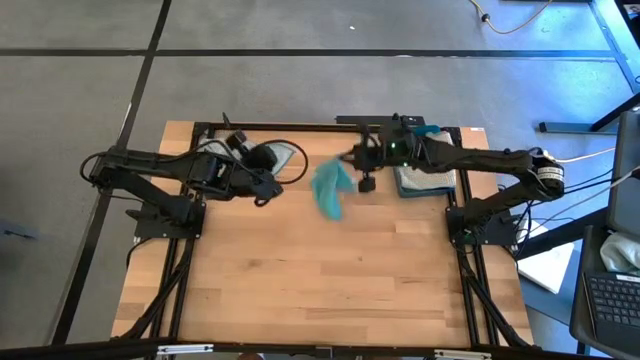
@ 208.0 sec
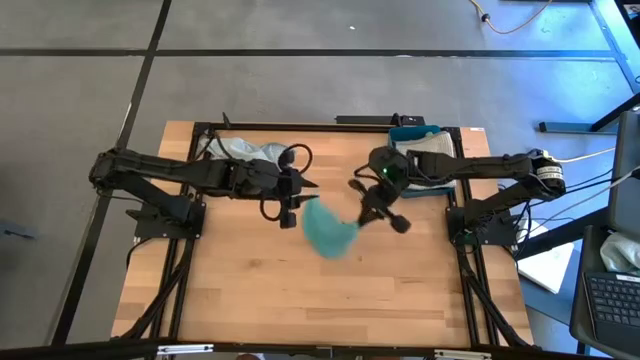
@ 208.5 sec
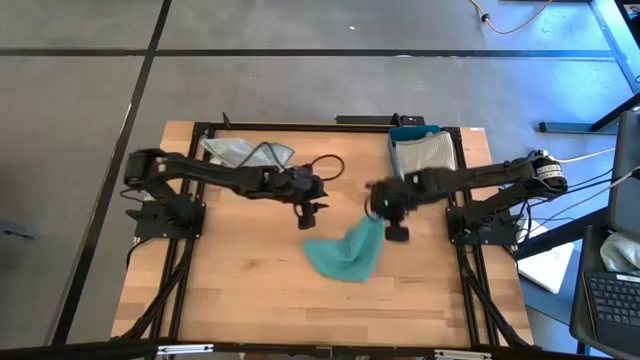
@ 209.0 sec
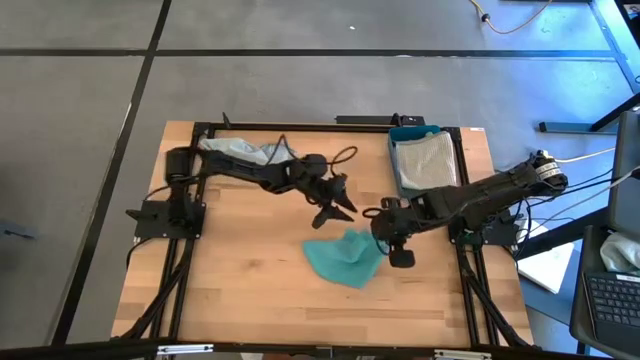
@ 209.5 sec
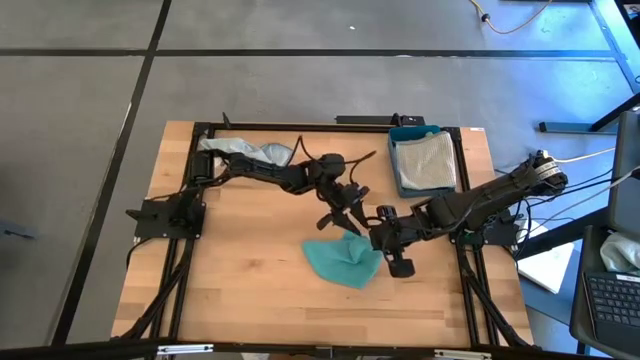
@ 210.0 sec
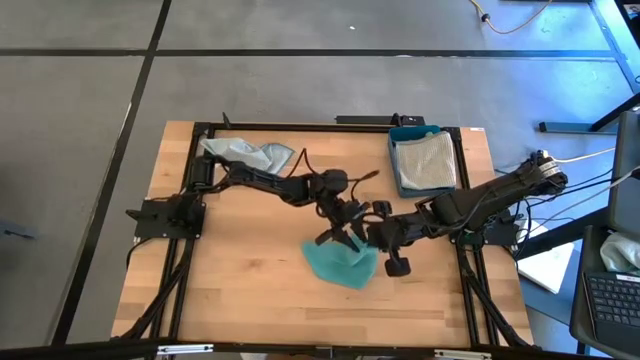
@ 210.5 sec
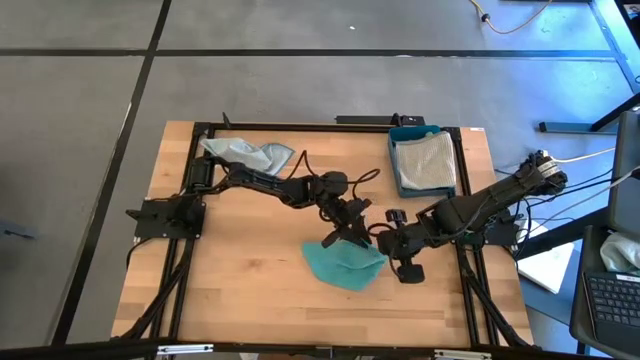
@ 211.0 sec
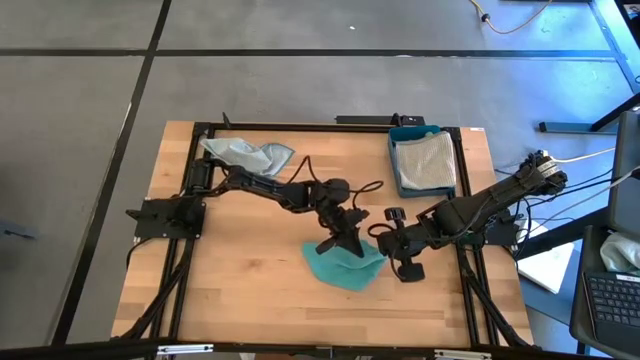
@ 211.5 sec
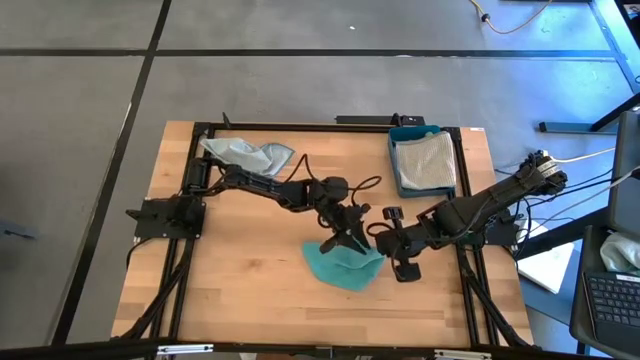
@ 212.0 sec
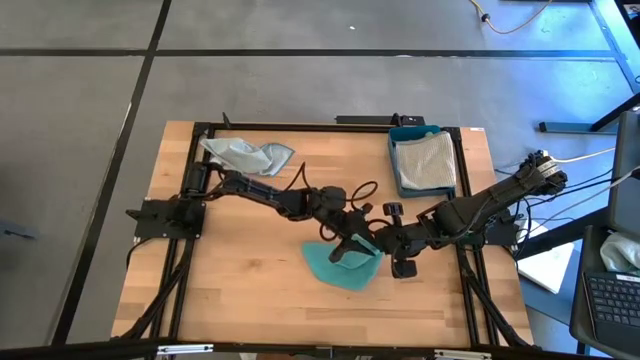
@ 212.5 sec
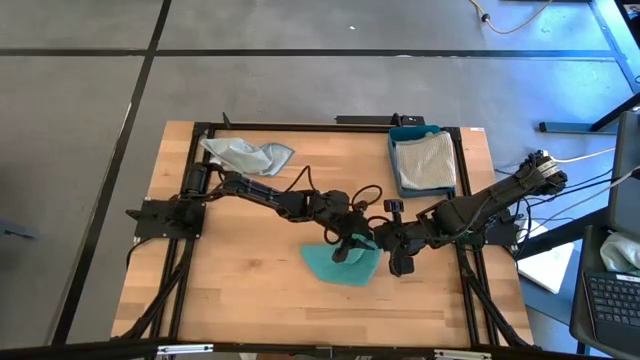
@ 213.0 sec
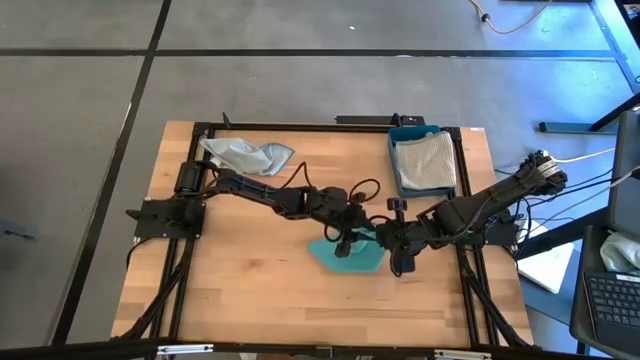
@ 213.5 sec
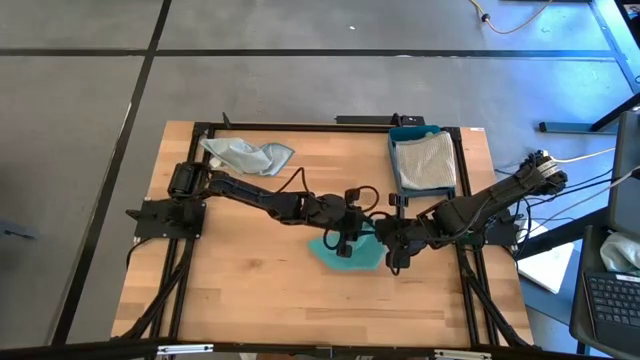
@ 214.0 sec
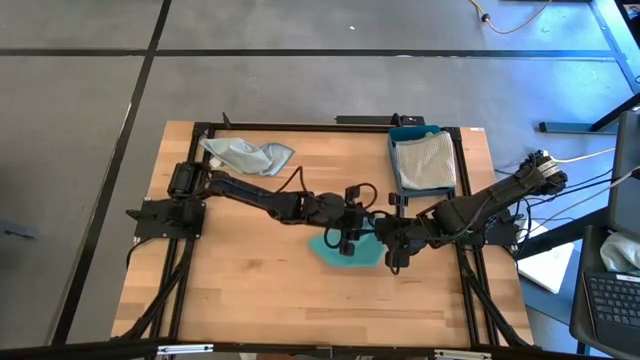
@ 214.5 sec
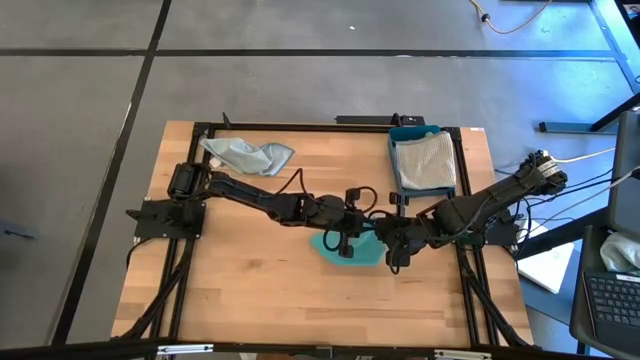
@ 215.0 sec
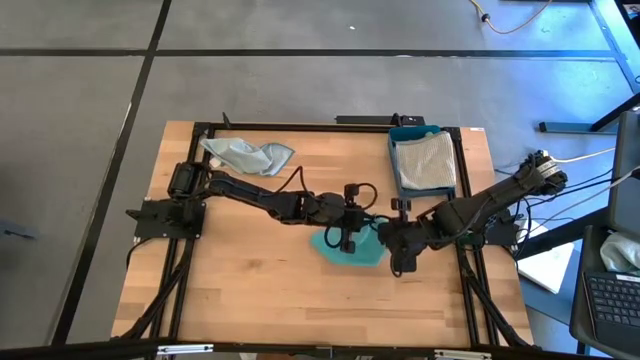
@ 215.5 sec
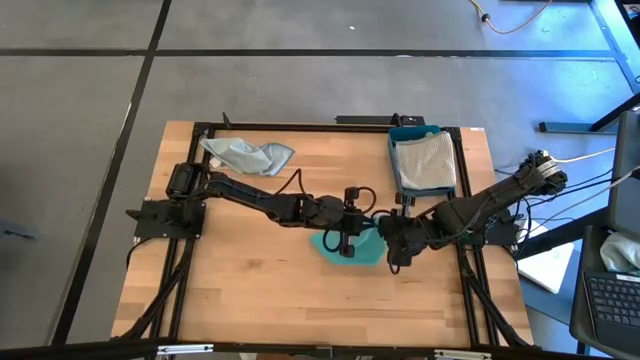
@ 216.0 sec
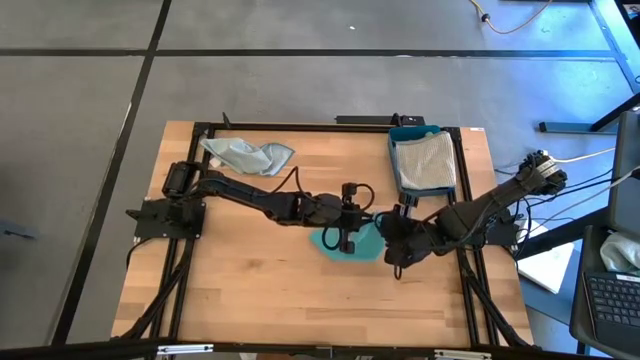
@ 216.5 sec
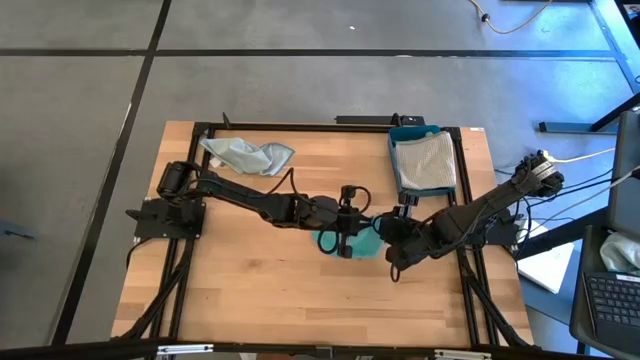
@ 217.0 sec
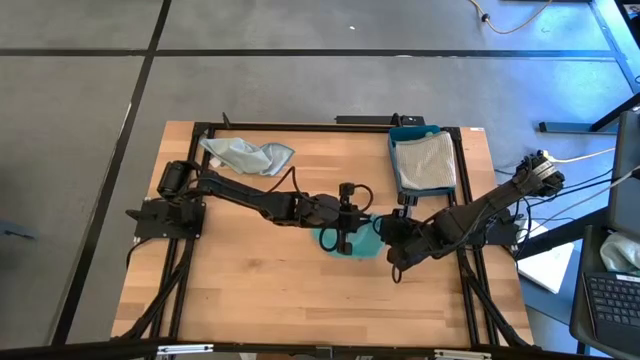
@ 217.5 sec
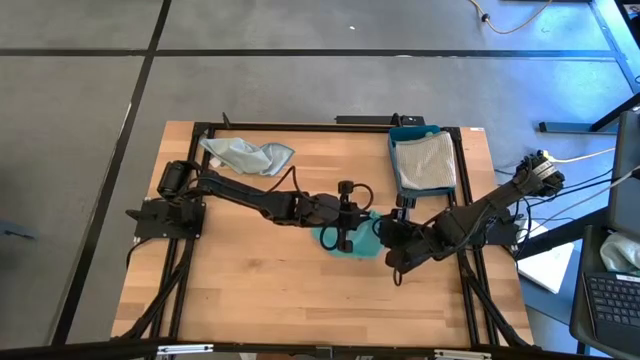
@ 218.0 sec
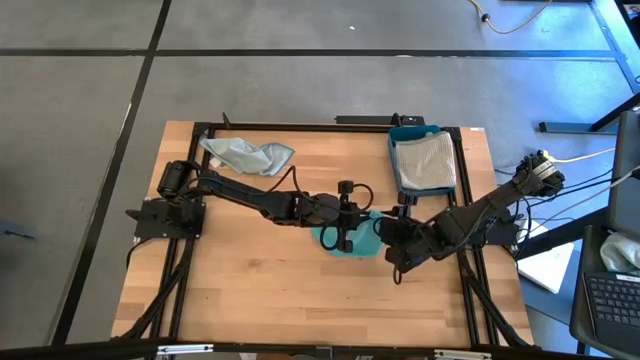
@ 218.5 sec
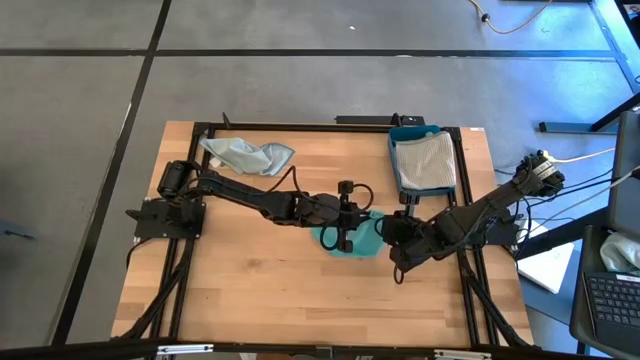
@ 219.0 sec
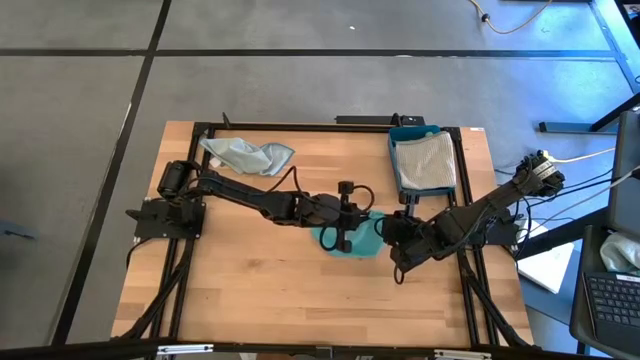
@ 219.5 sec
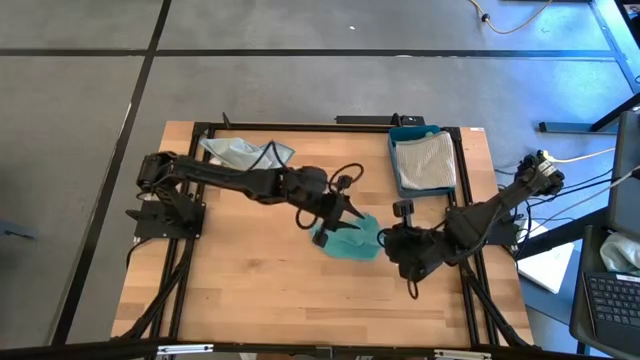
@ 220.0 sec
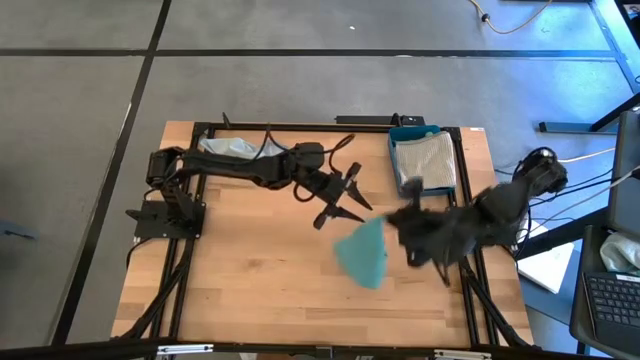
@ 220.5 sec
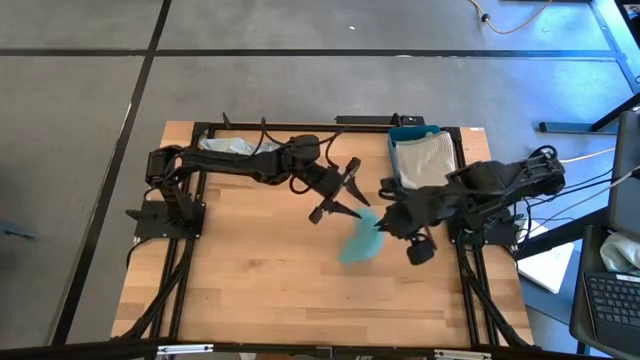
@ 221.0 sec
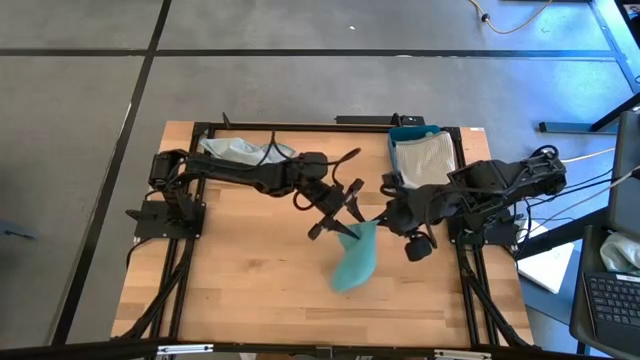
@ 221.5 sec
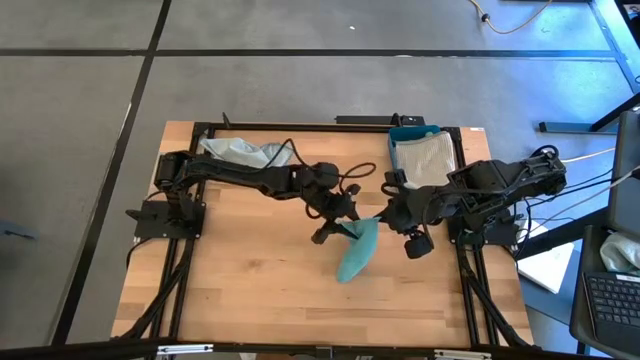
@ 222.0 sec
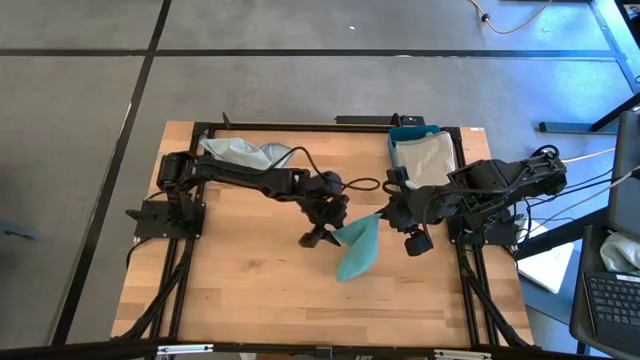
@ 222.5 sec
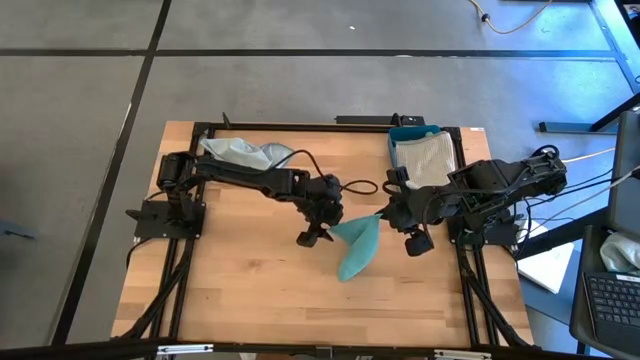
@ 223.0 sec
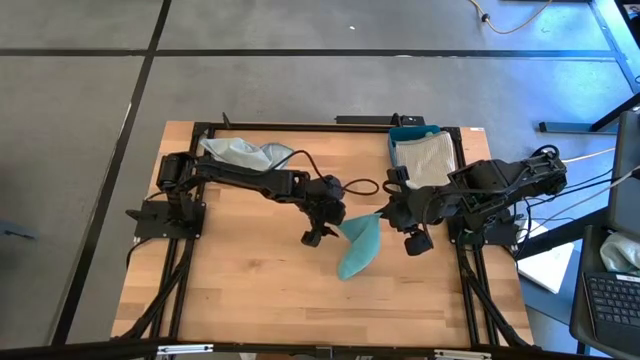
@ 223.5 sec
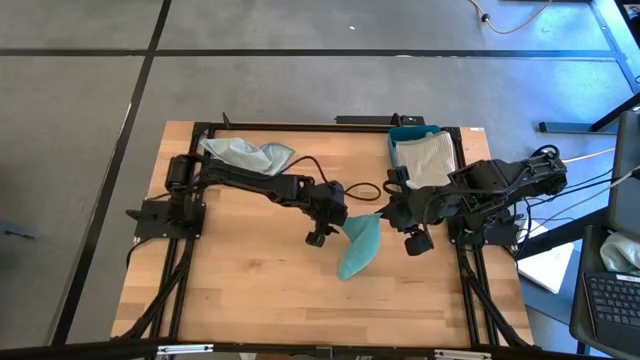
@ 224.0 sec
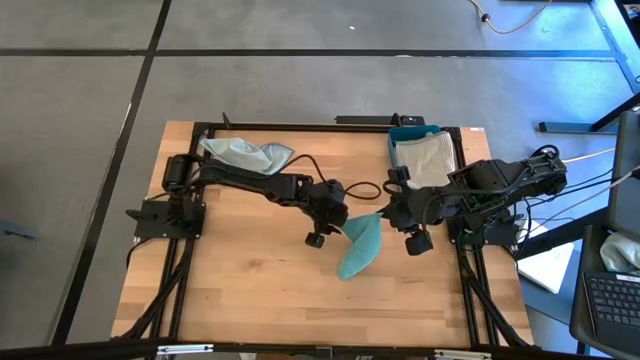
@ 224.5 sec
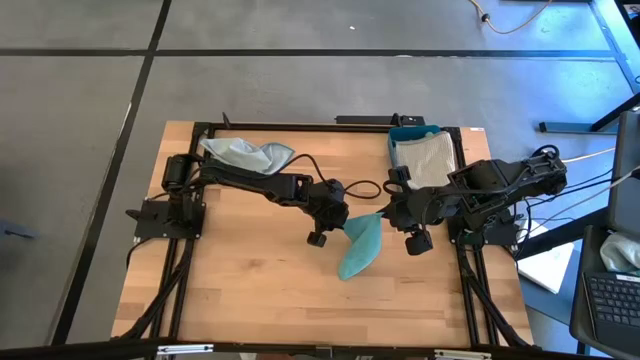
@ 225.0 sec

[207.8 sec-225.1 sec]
Task: Fold microfiber towels
Fold the blue microfiber cloth

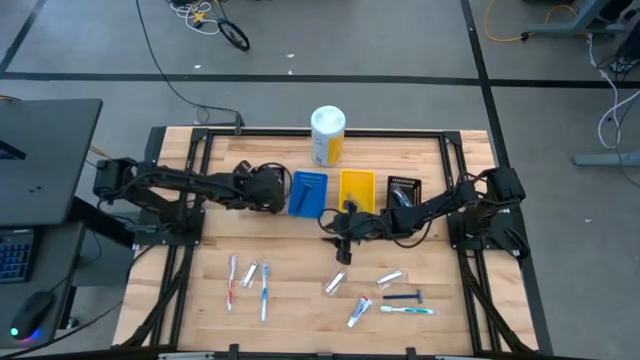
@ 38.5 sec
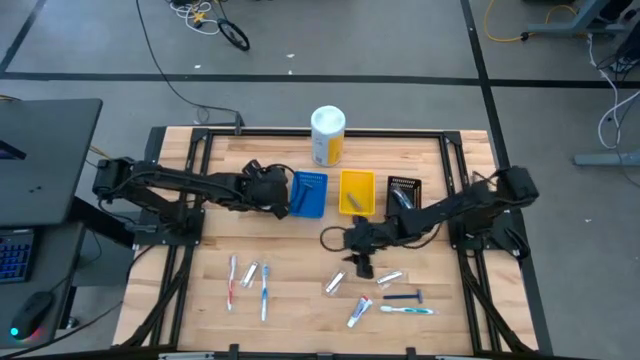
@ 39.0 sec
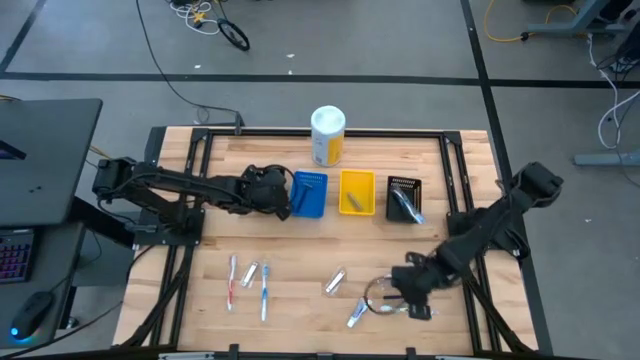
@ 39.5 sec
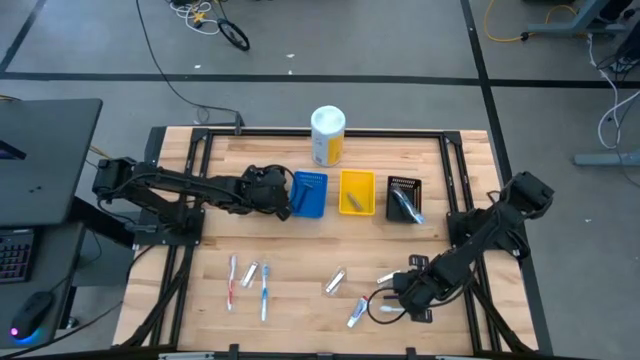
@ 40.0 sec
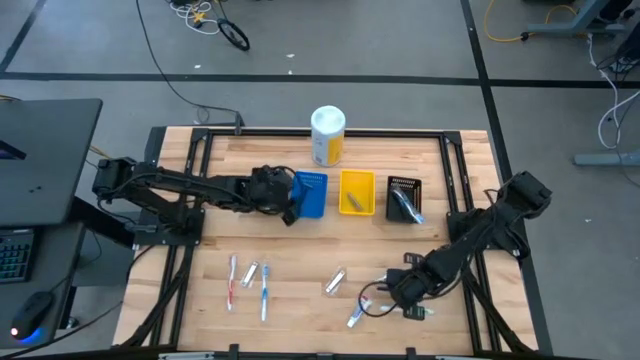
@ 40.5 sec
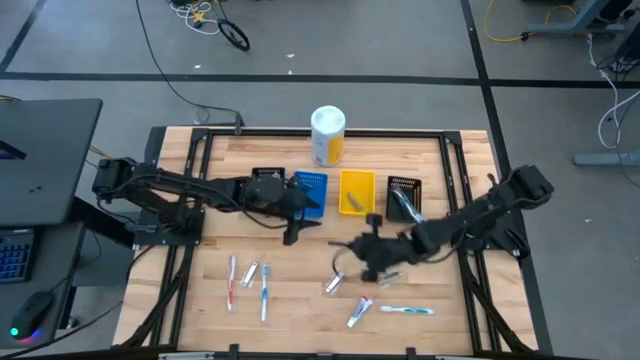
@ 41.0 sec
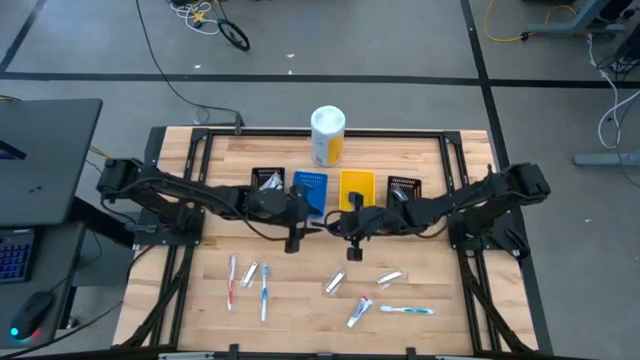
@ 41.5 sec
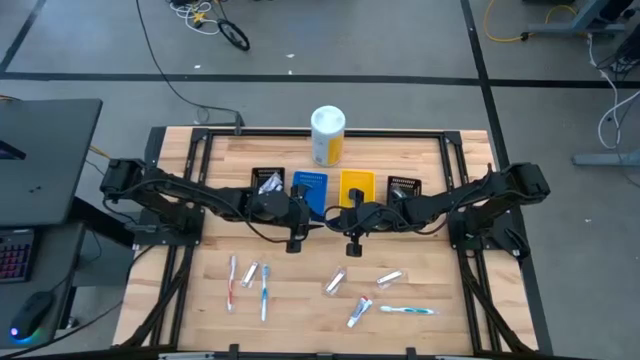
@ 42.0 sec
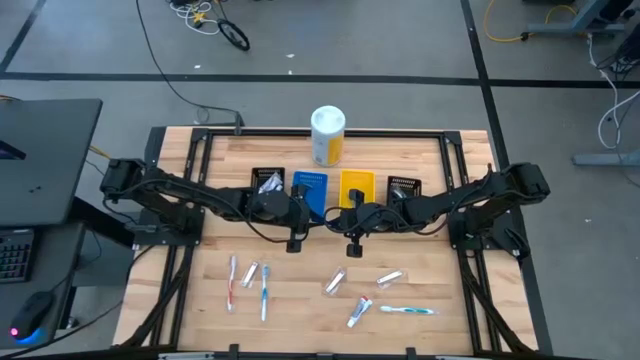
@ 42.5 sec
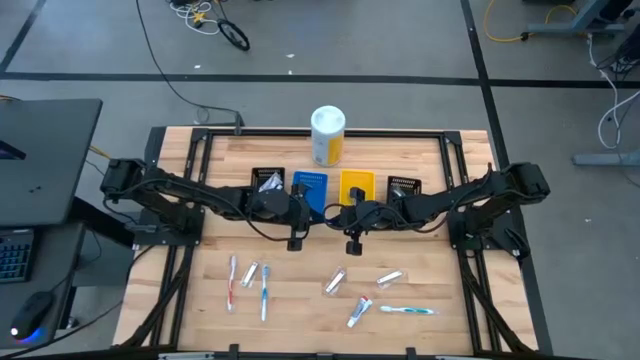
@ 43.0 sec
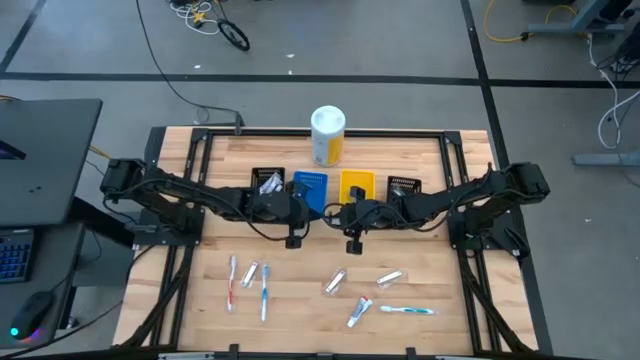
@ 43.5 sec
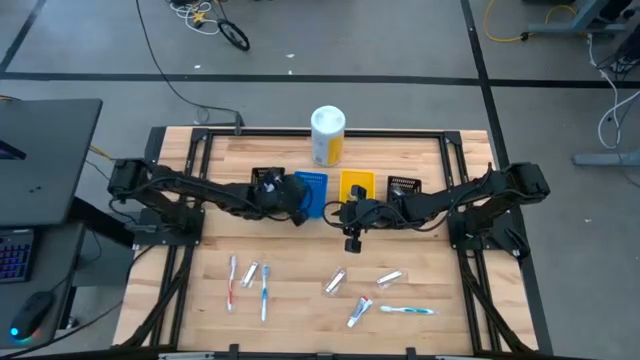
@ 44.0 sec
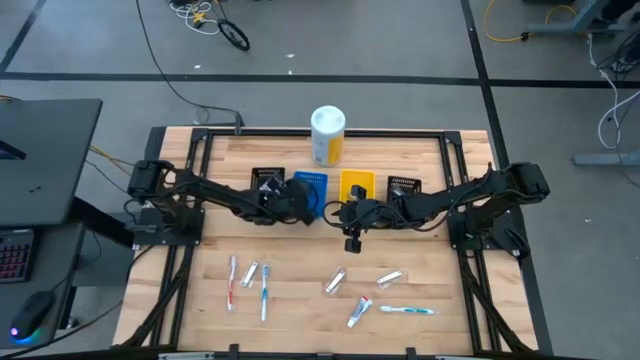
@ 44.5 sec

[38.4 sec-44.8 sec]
Task: Pick & Place Travel size toiletries
Put the blue razor into the blue bin
